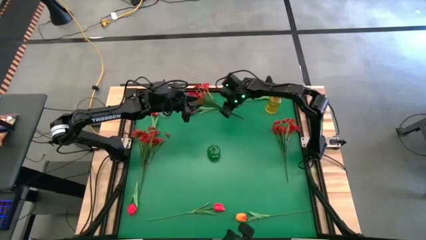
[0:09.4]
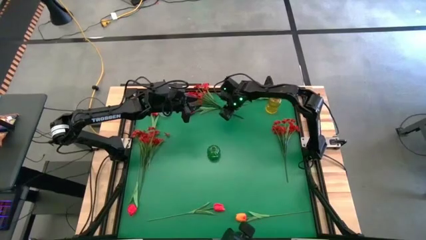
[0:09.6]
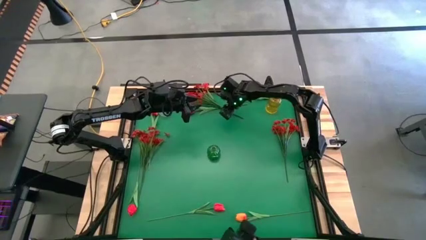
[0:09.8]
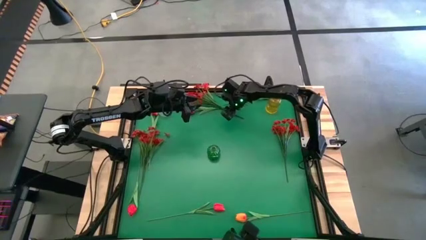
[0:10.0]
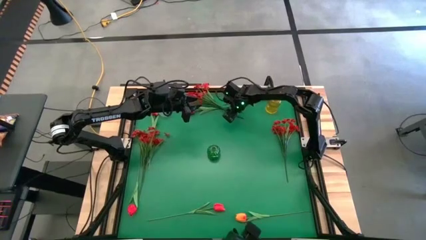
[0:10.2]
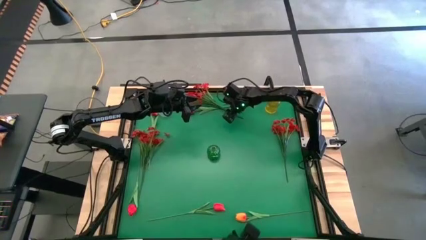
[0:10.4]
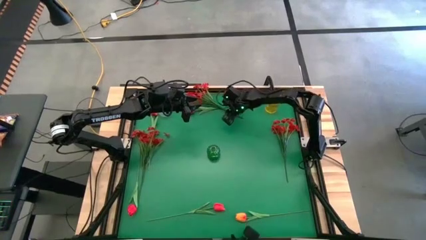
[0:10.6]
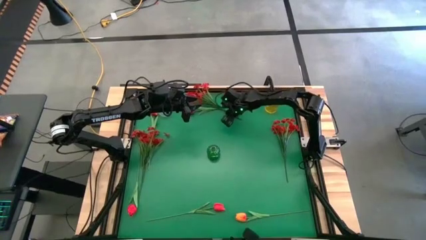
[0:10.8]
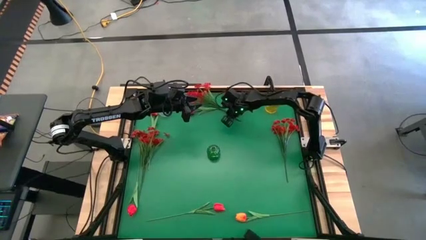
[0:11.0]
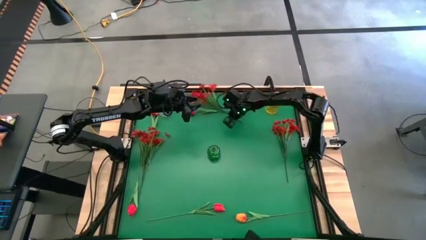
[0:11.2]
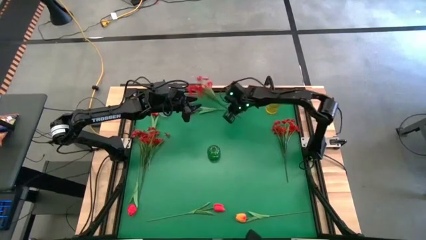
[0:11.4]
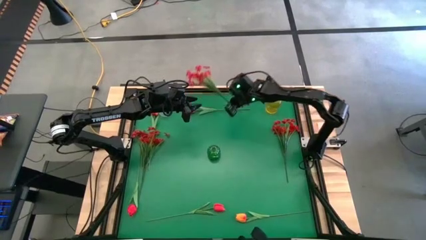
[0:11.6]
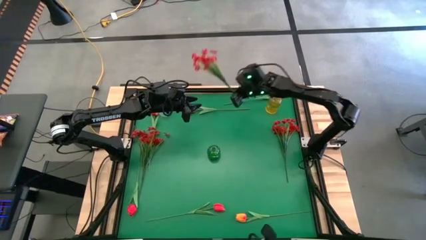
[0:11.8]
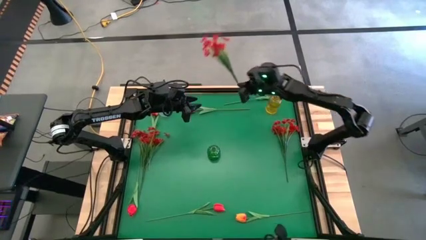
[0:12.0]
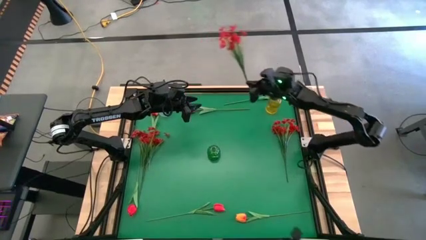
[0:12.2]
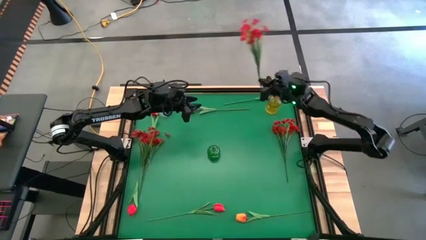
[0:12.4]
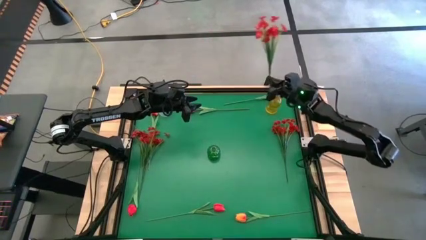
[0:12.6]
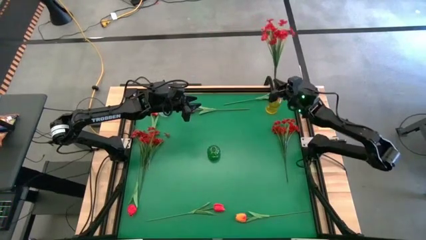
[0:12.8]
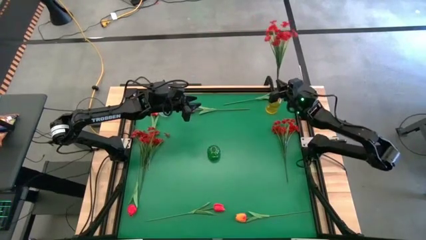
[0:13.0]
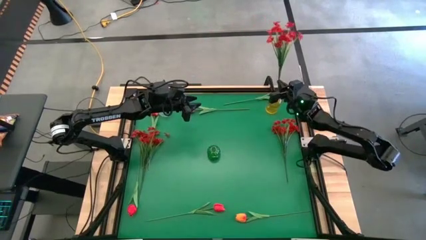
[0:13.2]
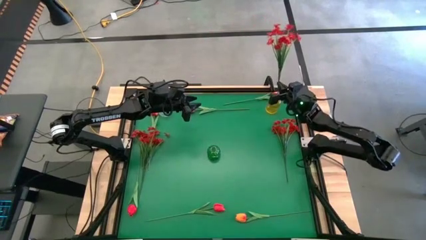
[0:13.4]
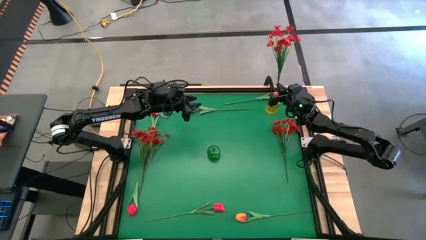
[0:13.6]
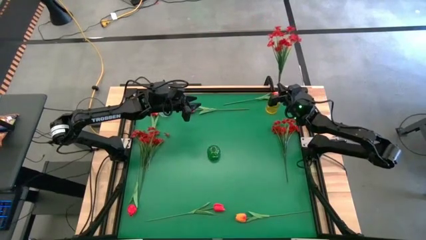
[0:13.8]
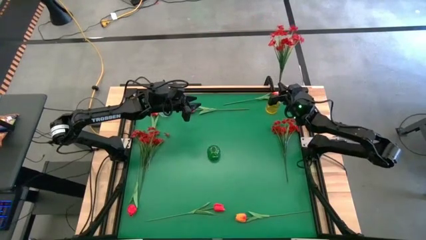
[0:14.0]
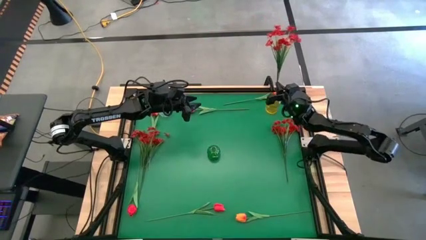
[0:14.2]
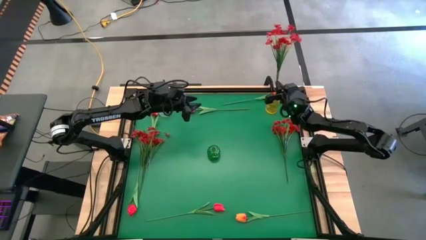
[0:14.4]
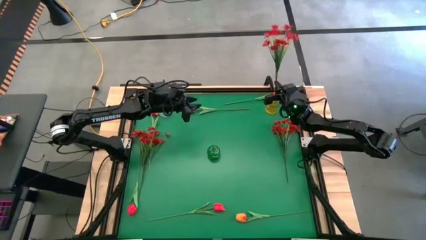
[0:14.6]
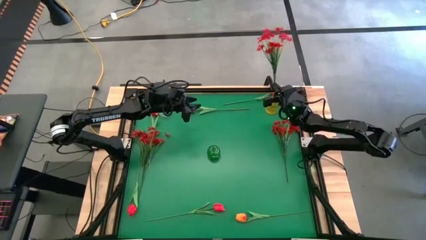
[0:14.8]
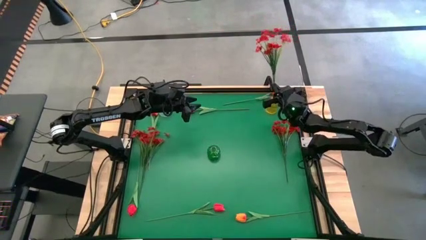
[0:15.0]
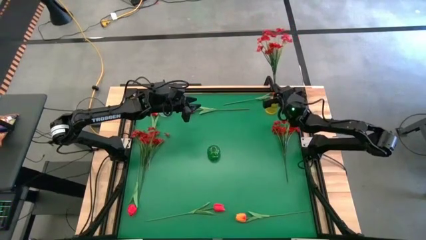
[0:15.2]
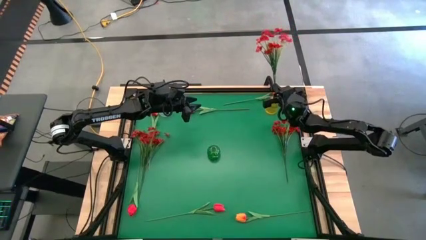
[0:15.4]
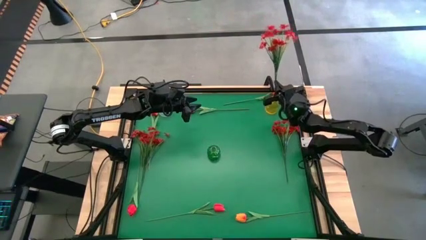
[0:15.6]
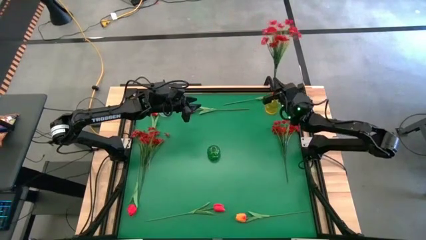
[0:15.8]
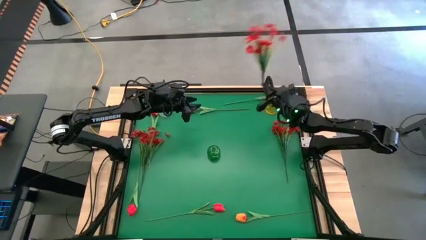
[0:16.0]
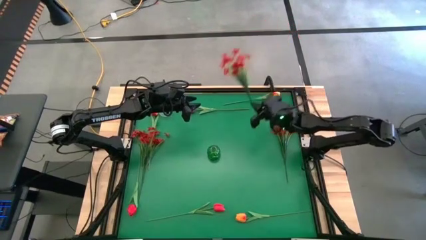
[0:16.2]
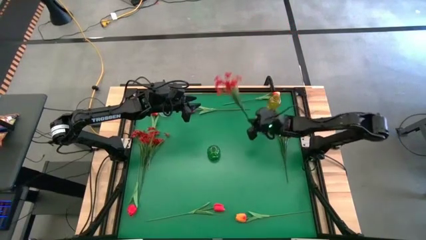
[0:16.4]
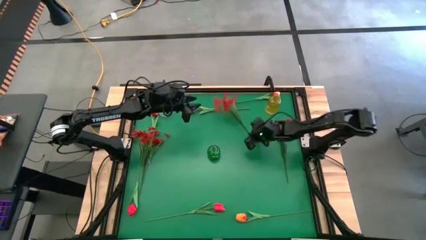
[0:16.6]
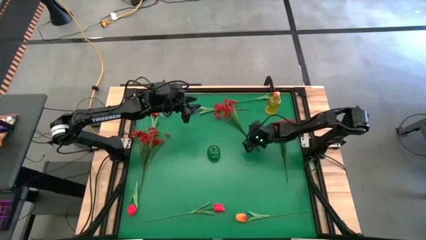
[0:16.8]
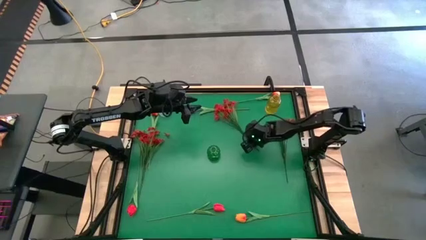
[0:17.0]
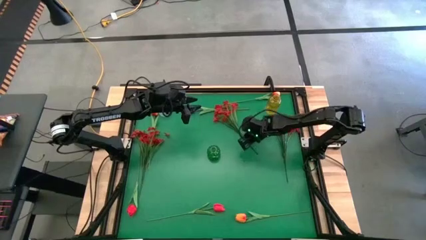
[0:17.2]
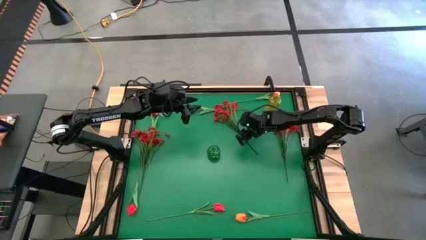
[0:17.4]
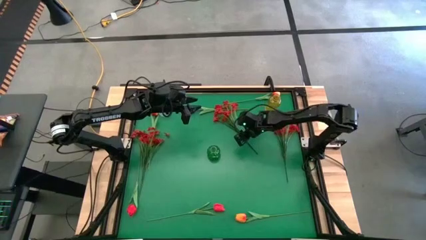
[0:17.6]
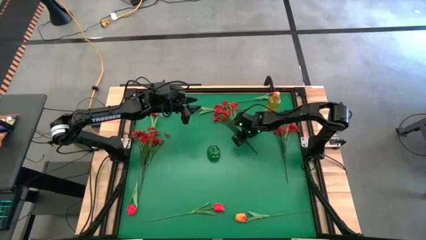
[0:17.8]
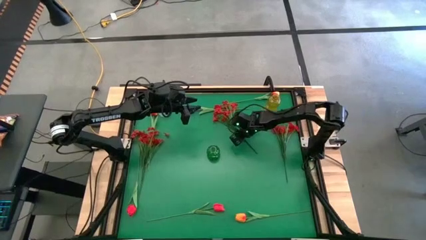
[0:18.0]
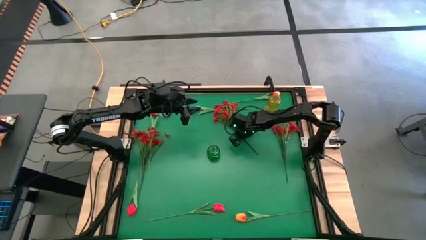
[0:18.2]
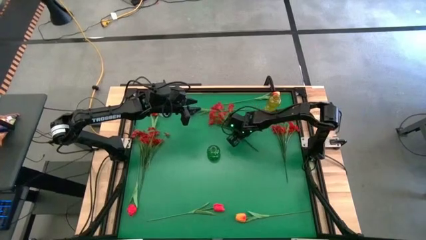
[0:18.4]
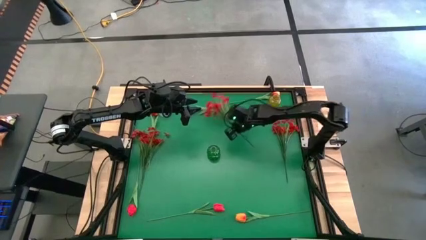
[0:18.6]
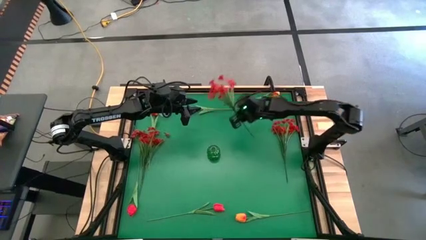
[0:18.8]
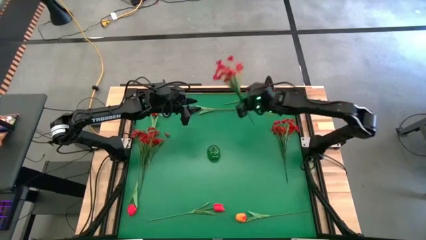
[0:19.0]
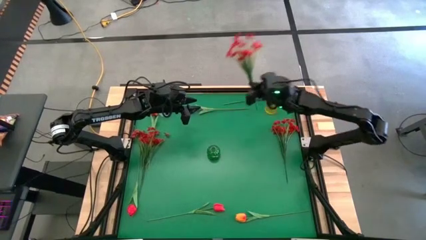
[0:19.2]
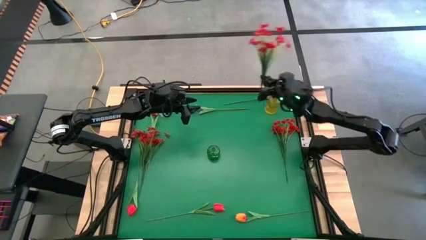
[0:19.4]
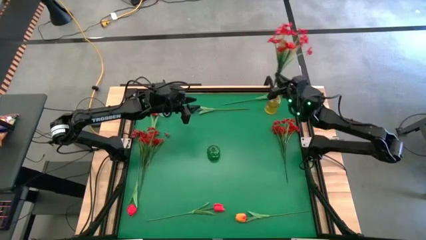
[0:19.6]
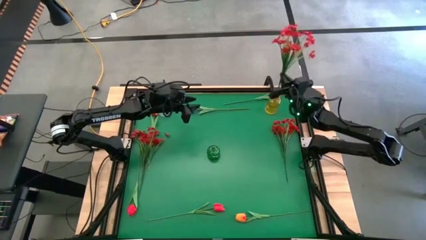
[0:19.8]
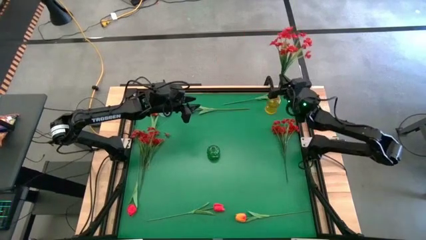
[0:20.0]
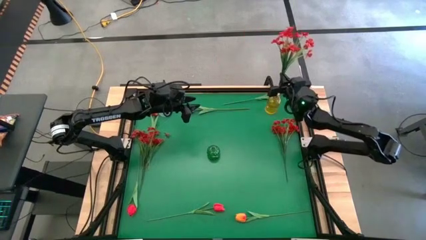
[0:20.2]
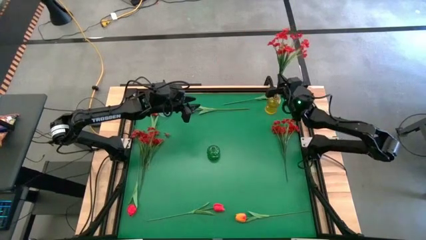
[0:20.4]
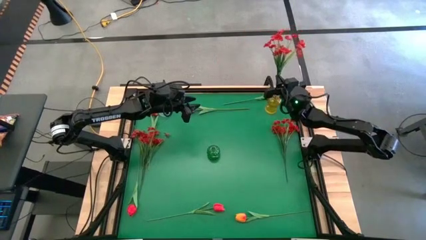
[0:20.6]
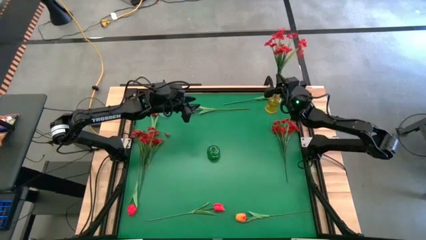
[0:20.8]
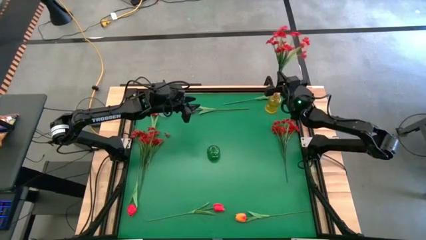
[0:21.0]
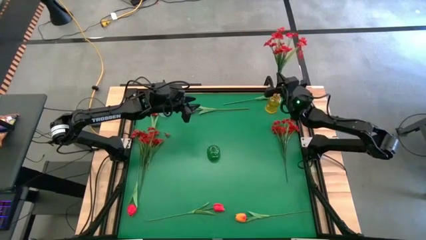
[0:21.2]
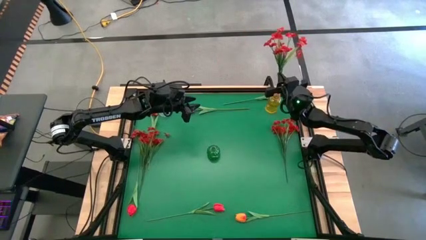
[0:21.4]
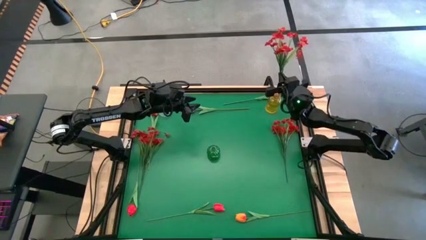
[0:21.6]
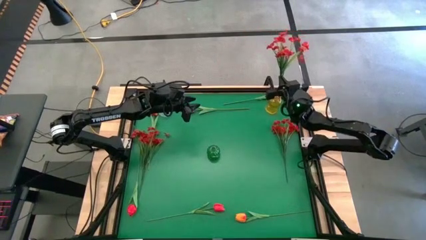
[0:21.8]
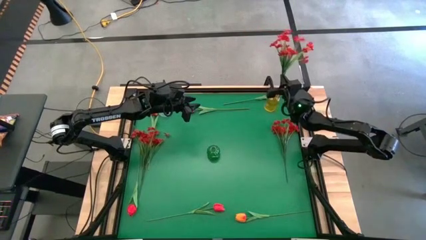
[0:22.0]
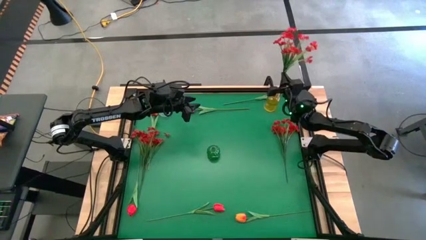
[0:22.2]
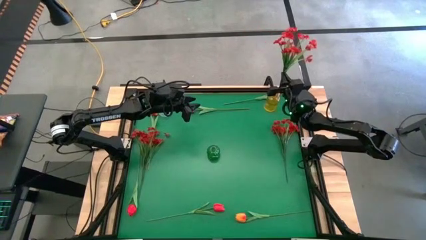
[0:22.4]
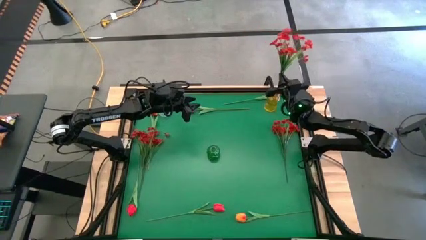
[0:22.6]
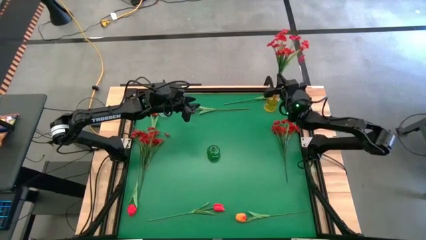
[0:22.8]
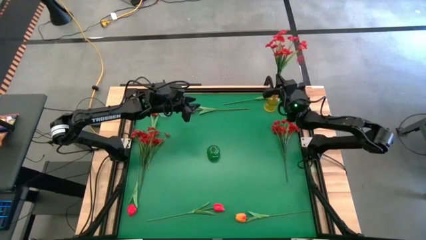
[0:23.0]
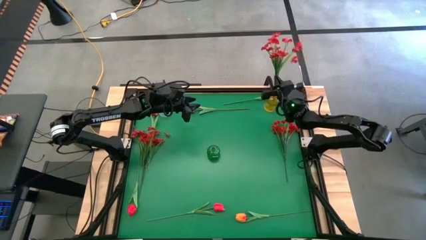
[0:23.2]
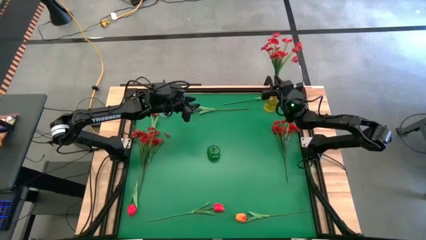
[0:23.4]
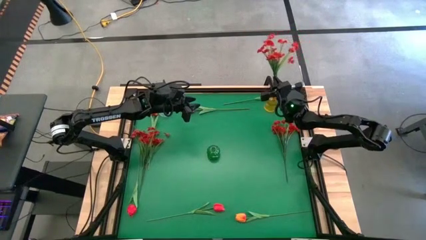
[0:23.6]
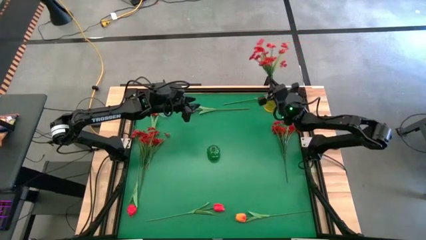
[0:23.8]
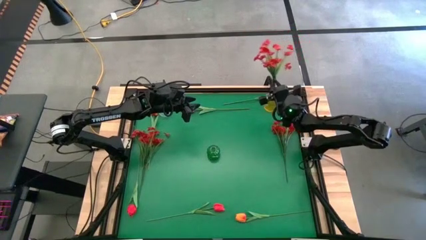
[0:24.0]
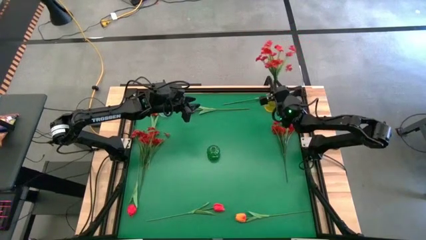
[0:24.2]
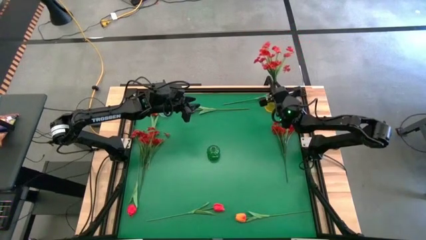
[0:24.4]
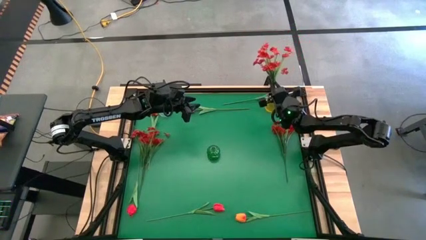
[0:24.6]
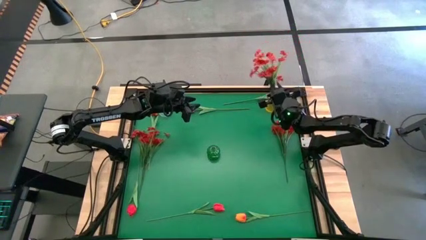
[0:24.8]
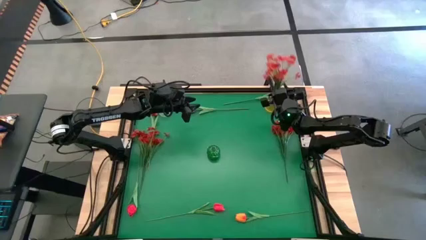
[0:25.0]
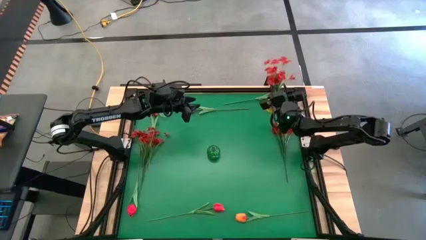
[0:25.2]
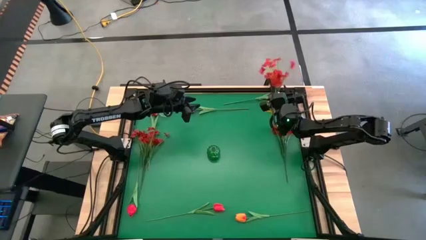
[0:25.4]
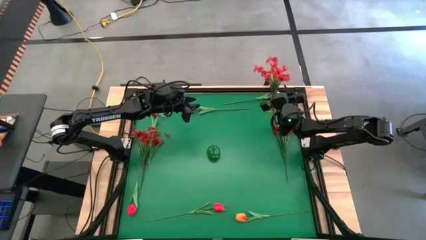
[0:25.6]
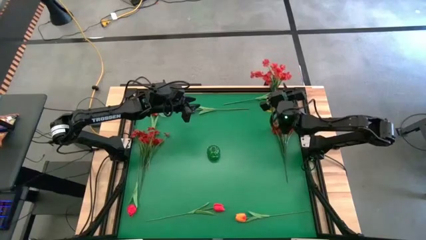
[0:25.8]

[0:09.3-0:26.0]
Task: Sort flowers into vase by color
Put the top red flowers into the yellow vase
